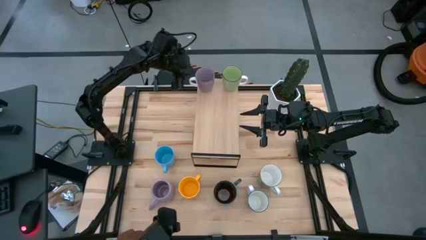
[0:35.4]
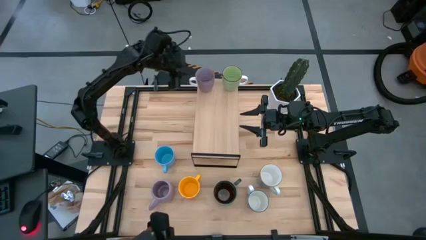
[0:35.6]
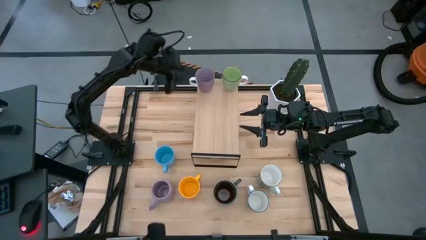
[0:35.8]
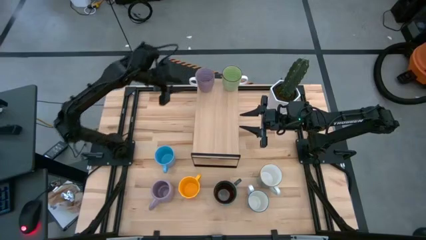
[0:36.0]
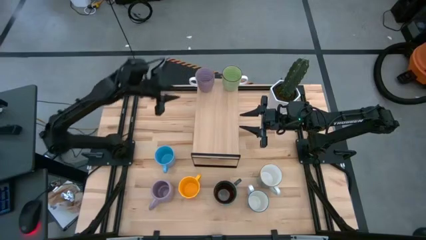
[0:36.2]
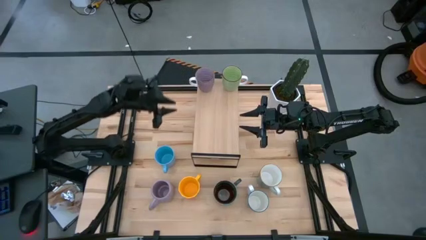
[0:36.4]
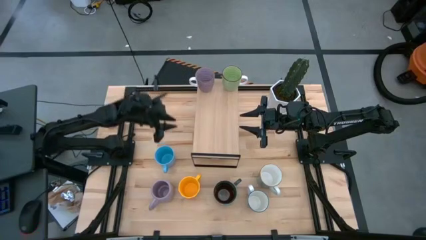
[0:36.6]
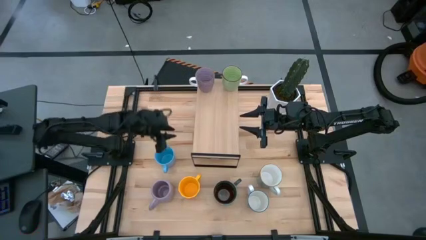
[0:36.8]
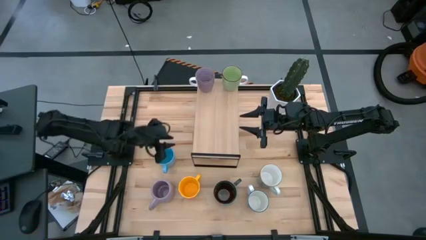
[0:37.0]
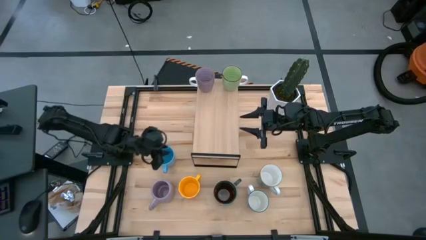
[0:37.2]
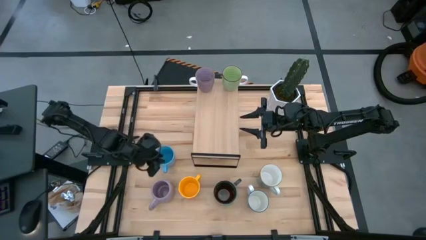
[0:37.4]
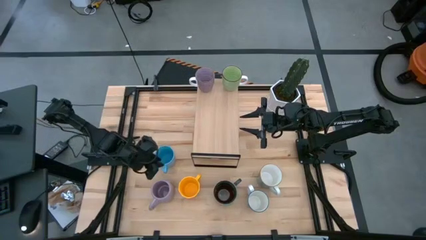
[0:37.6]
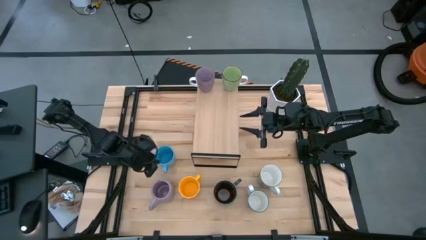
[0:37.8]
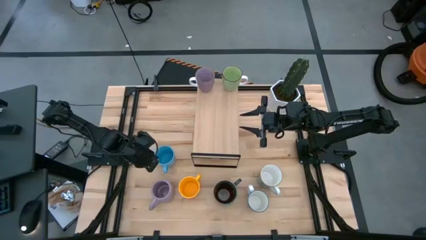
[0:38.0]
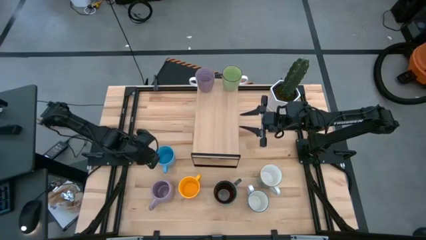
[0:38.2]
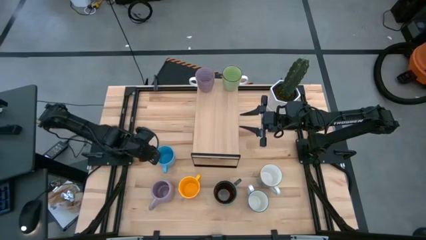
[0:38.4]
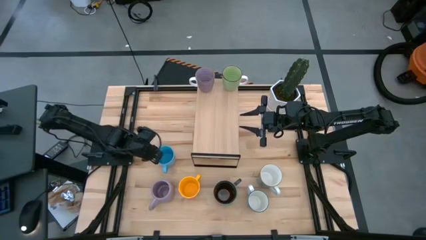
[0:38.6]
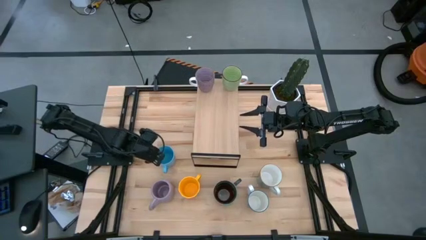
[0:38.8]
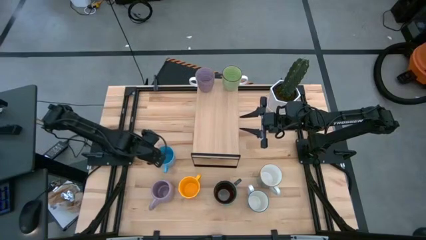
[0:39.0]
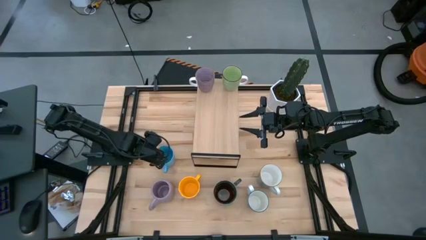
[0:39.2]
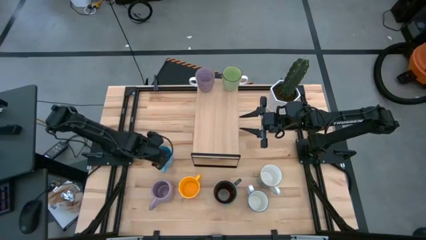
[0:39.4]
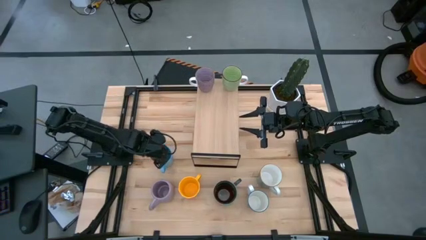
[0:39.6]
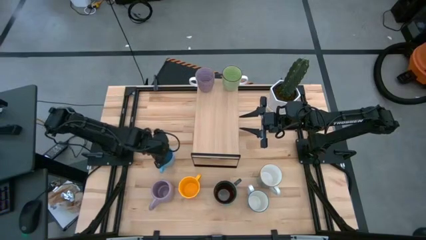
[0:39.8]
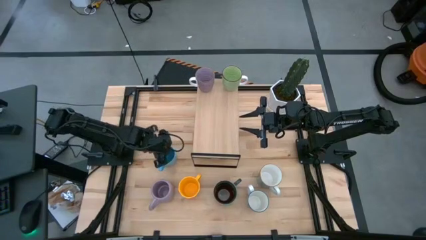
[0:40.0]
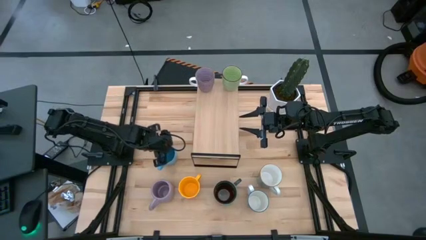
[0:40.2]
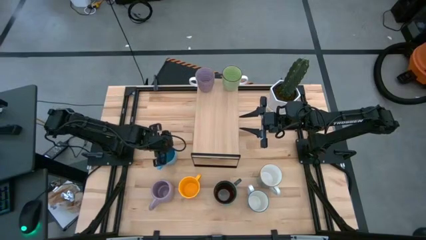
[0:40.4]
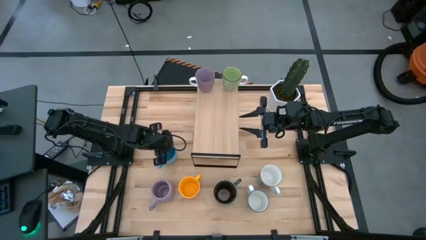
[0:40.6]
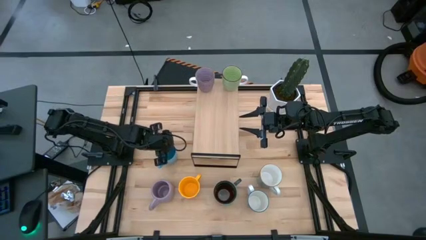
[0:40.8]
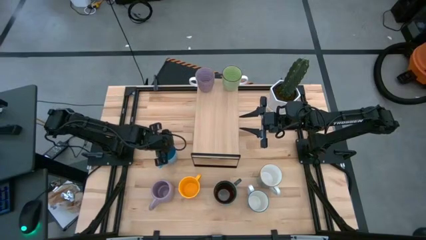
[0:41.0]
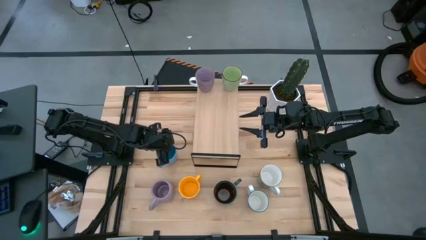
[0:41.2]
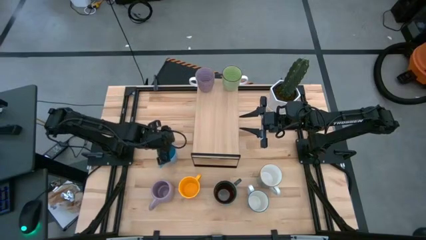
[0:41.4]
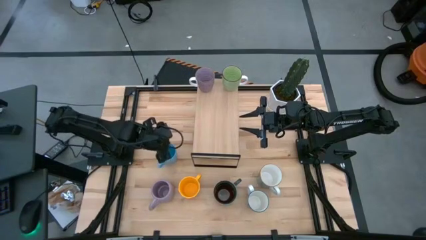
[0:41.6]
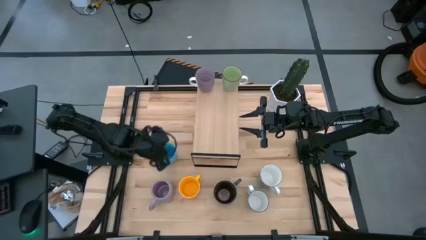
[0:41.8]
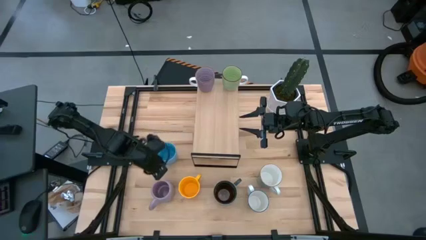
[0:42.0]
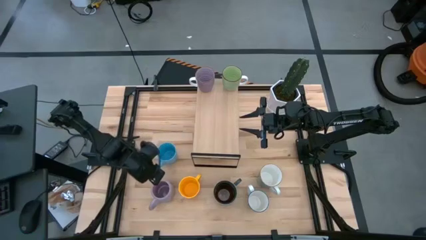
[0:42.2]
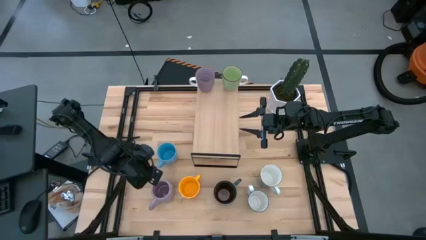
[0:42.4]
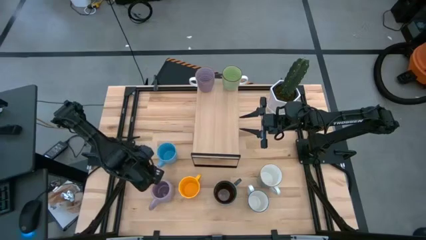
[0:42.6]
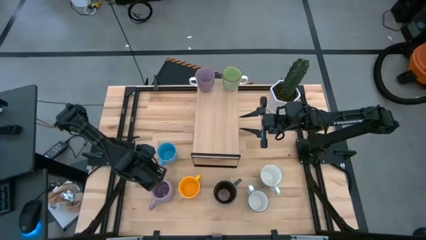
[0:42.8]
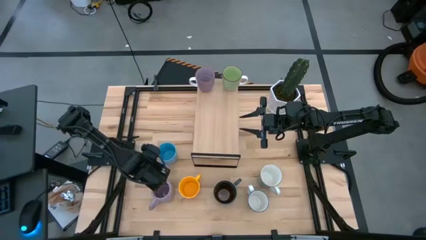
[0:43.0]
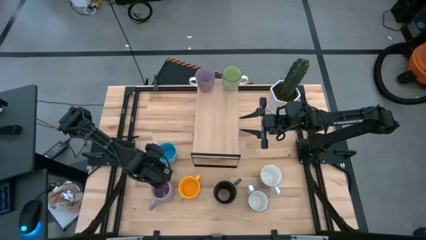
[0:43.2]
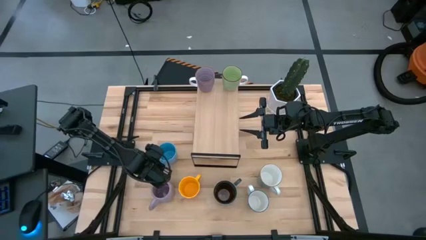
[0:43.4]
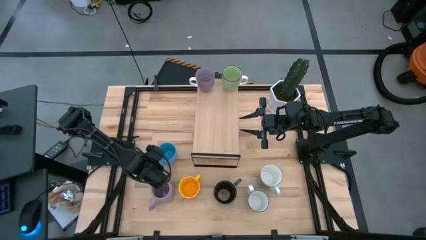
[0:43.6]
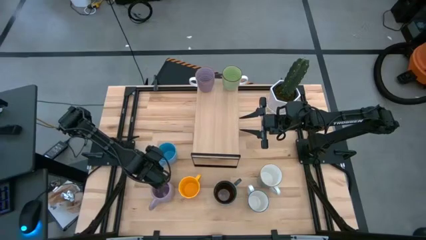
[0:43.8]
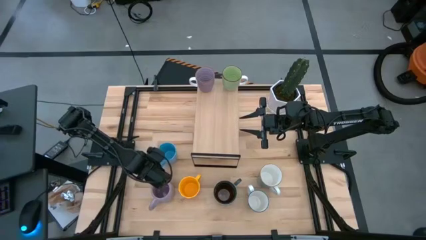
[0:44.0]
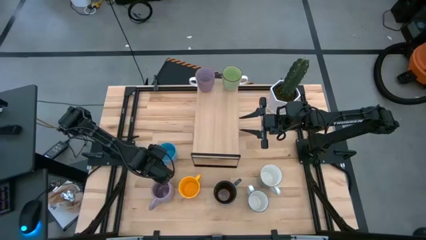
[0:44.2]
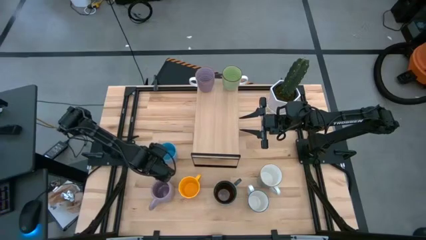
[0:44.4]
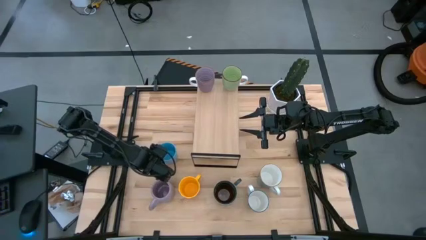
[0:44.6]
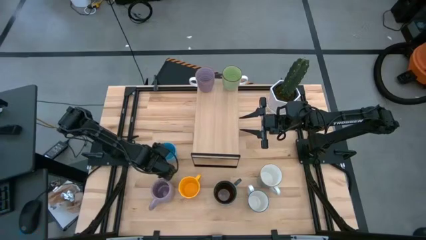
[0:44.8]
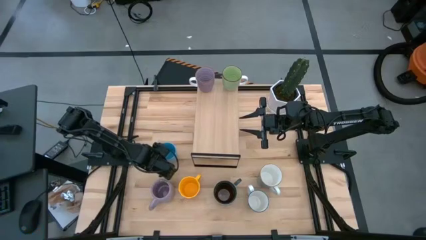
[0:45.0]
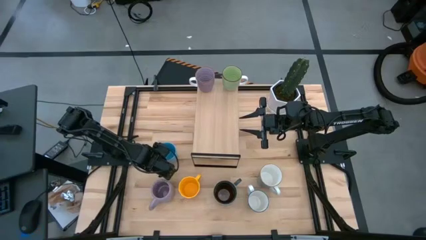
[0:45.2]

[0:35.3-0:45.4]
Task: Place coffee mugs
Put the light blue mug on the shelf

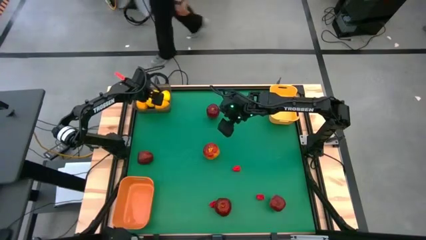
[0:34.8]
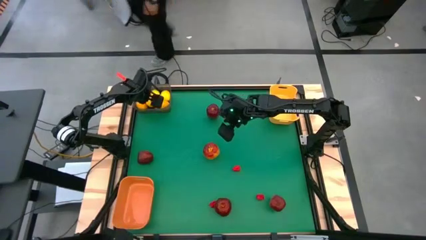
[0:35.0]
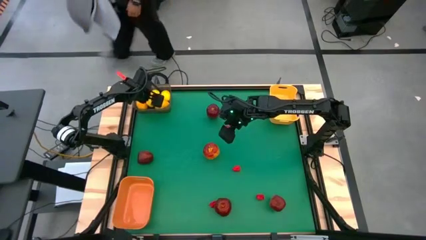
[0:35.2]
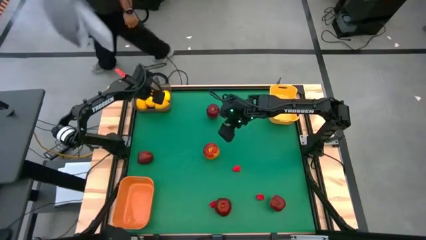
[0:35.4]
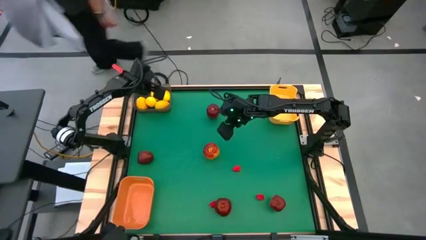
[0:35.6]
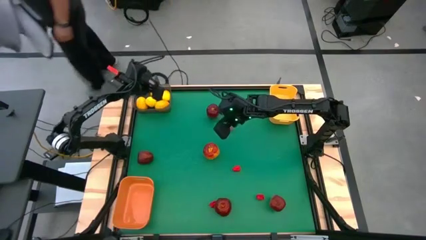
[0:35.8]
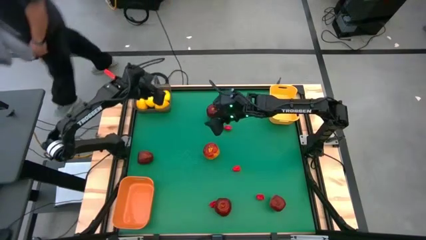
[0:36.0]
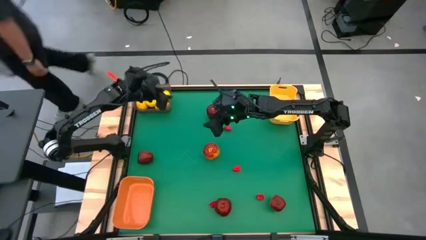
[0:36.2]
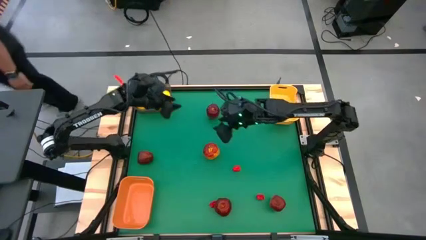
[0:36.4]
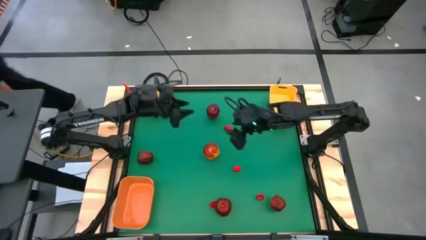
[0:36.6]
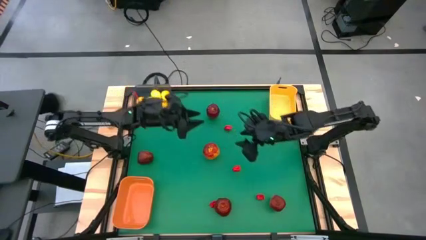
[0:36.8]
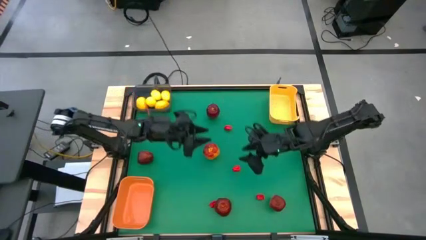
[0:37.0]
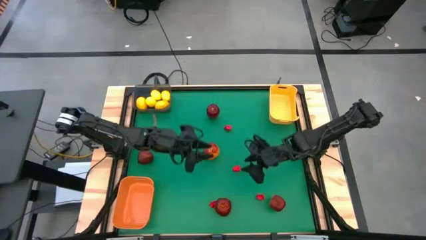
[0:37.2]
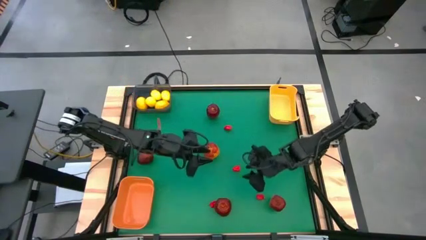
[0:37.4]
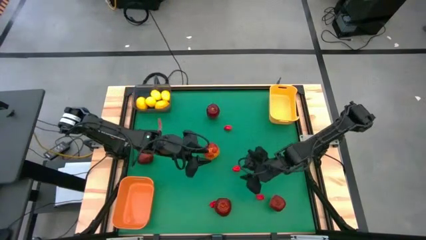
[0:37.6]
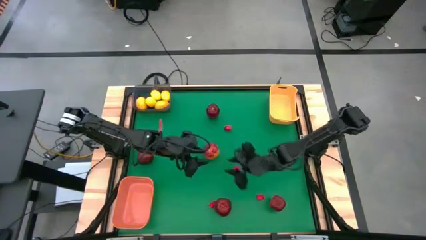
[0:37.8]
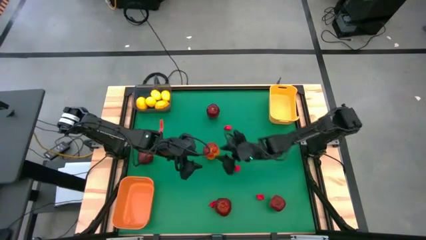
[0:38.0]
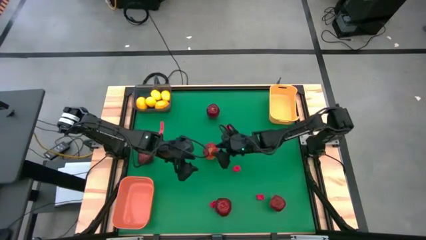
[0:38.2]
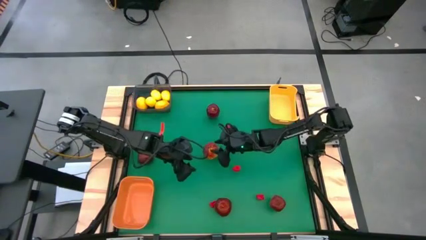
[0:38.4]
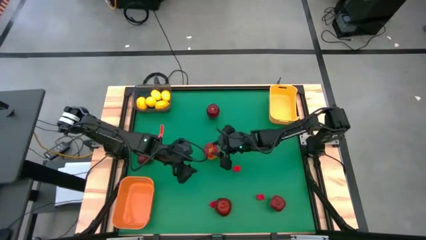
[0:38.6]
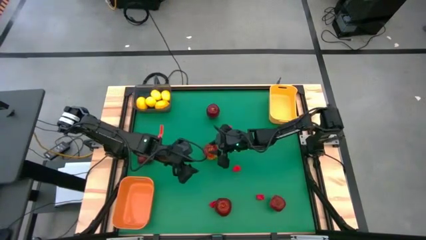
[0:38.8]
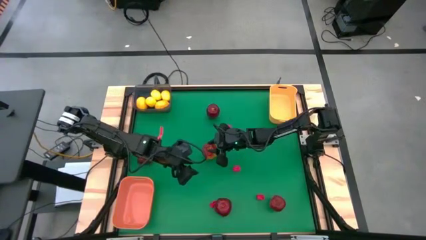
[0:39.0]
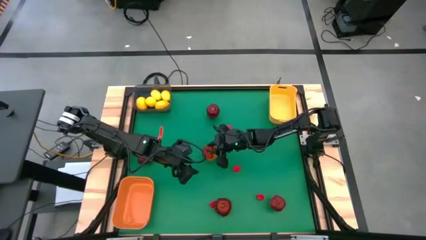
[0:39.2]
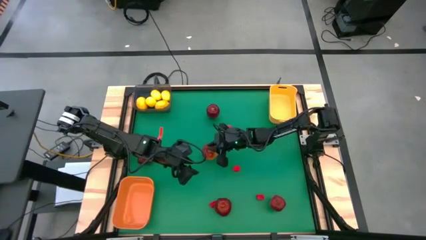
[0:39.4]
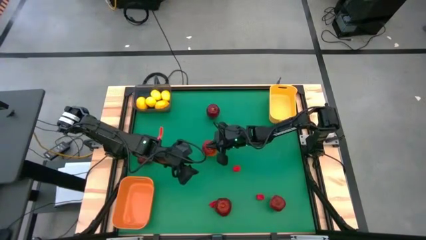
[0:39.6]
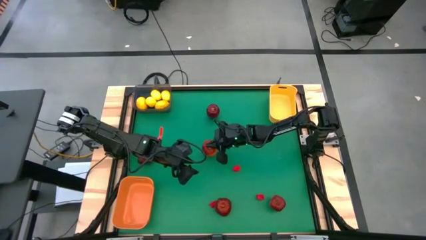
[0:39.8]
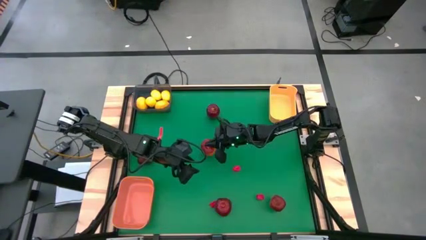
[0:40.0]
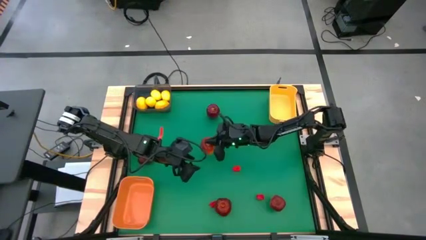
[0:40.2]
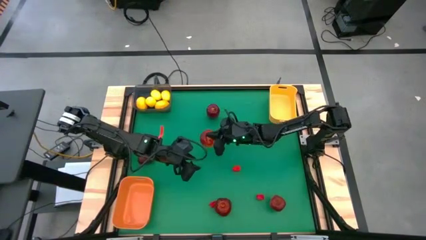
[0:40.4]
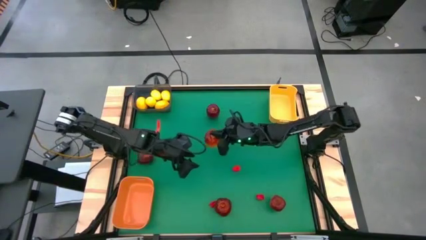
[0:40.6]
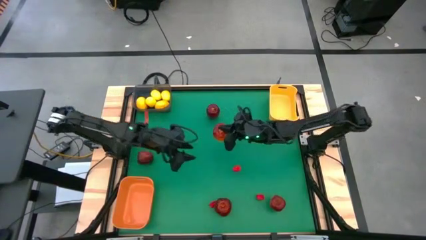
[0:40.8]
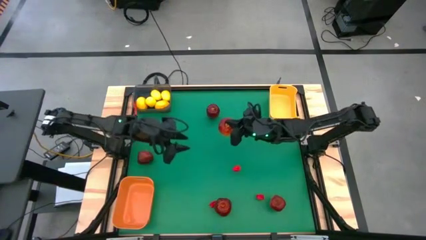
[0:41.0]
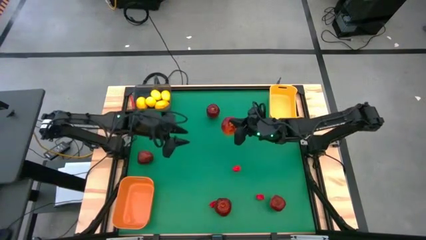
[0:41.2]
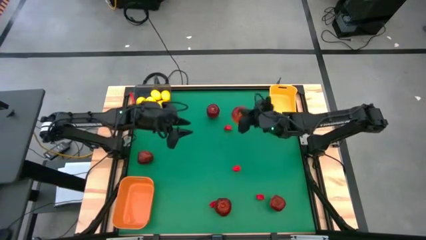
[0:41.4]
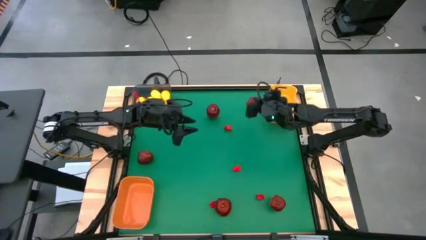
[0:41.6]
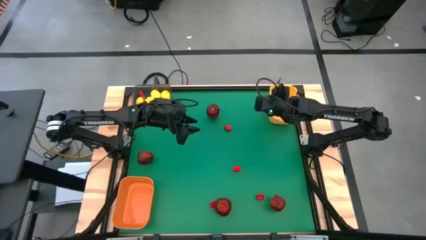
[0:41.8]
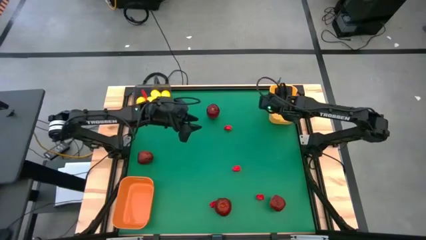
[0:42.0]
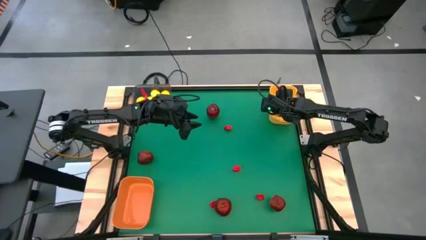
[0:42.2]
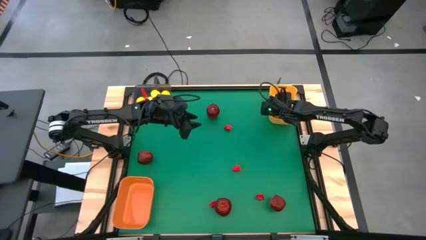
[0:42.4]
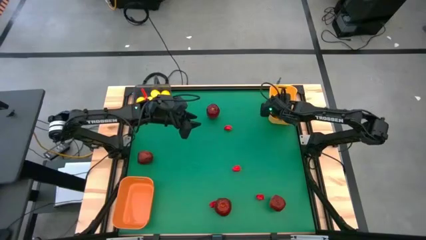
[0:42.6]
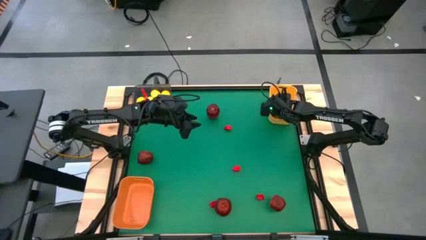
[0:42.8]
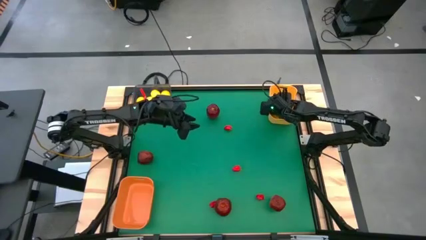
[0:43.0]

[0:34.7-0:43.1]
Task: Sort produce into baskets
Put the center red apple into the yellow bin
